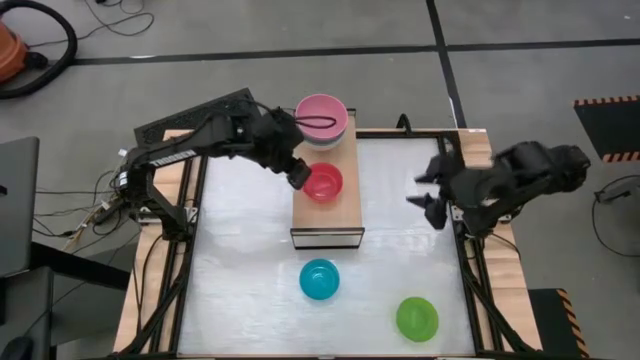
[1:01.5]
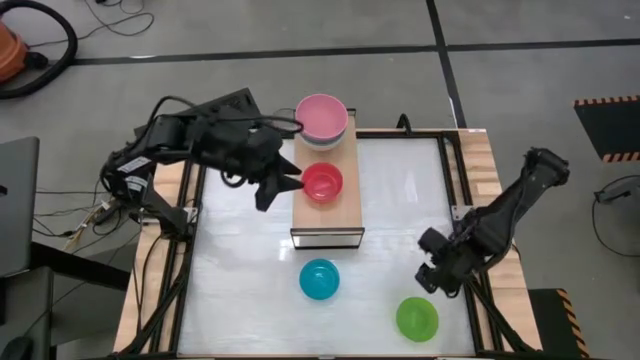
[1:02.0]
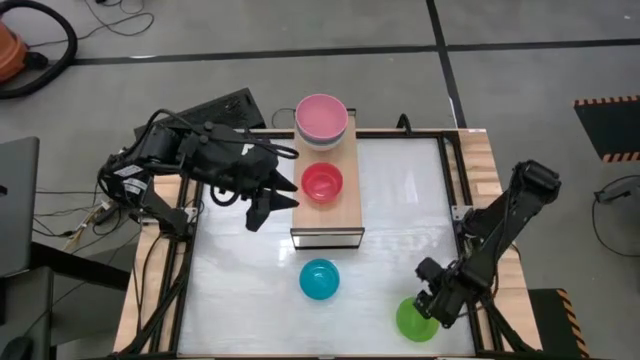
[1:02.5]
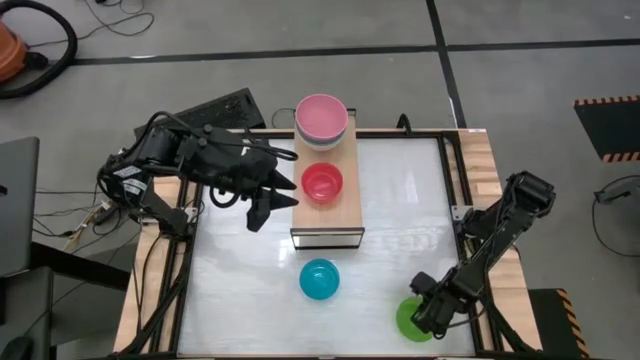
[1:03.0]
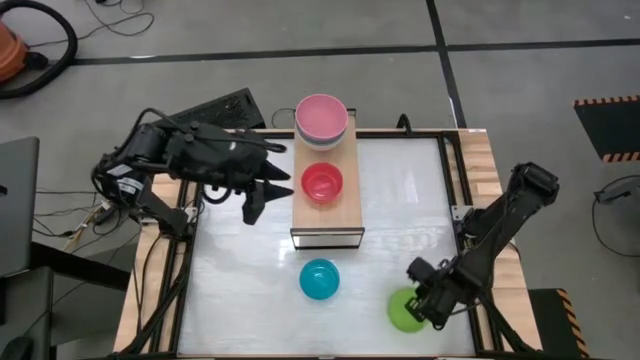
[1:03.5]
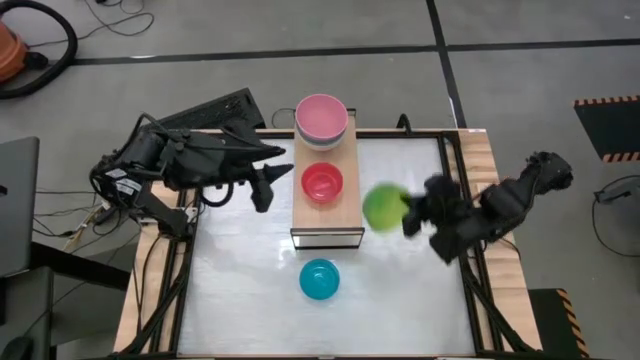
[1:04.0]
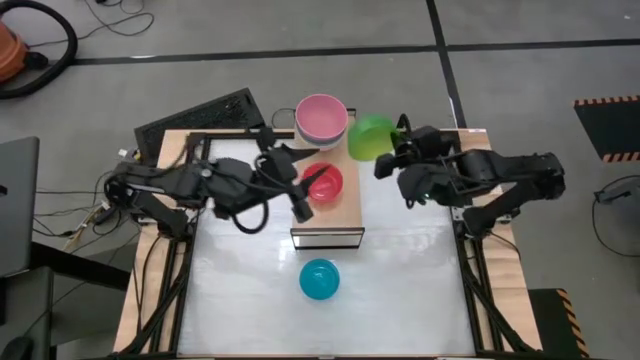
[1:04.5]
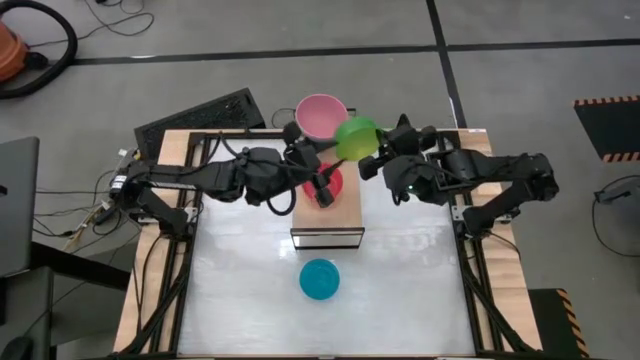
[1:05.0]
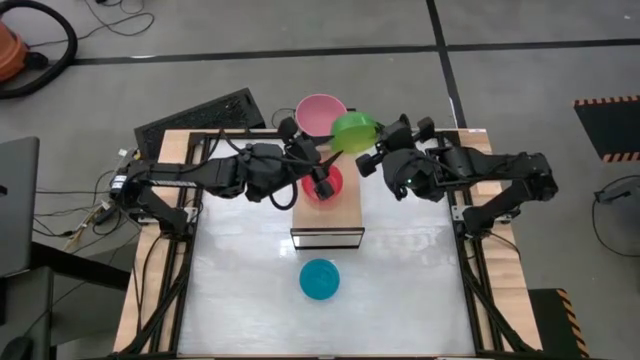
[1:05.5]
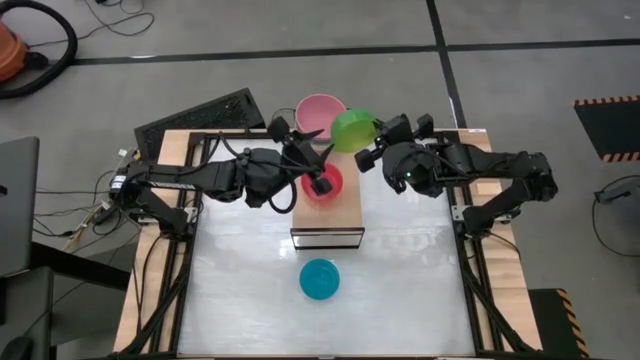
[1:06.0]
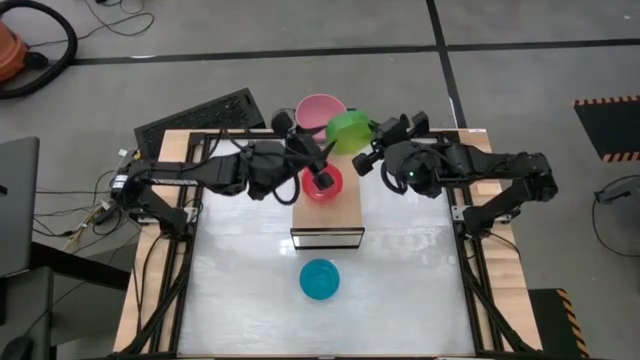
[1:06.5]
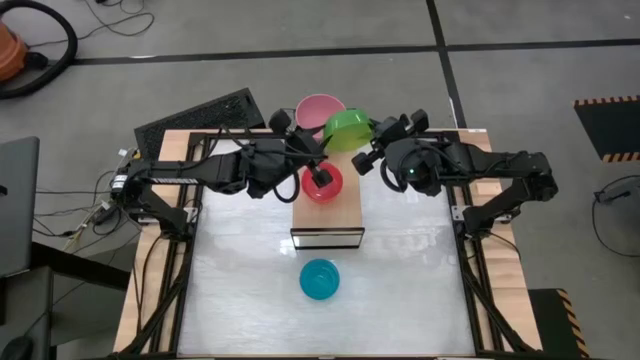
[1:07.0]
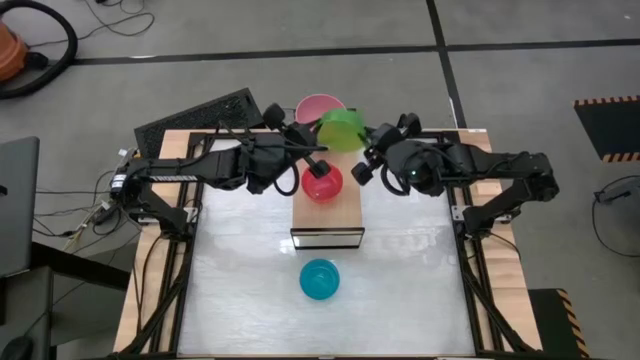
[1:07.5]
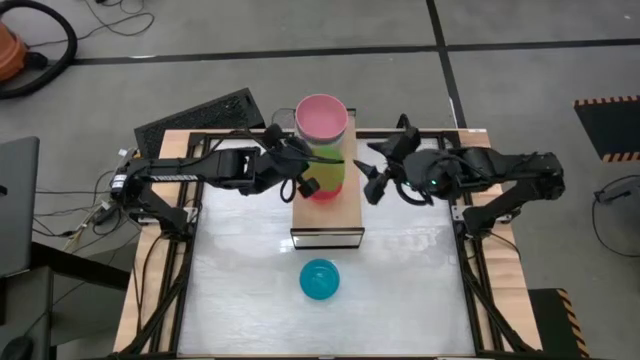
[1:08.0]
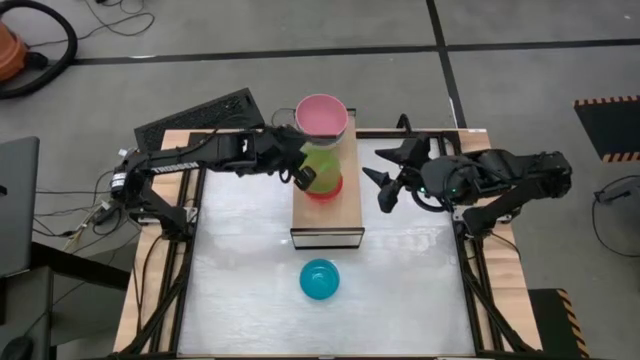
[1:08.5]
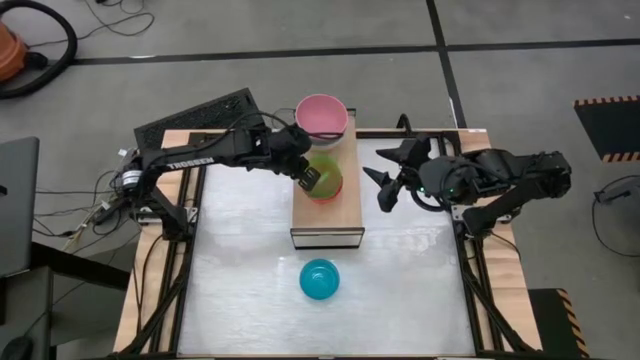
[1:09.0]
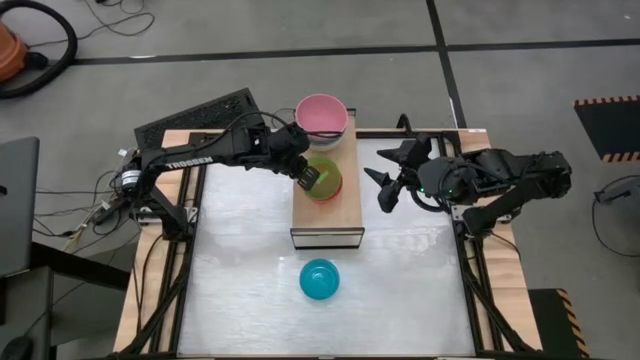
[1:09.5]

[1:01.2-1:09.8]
Task: Place and stack bowls onto a shelf
Stack the green bowl on top of the pink bowl on the shelf

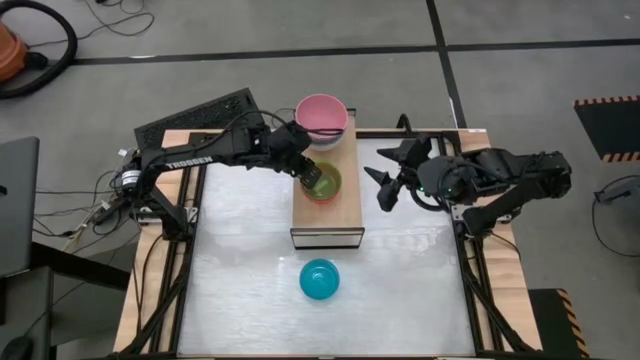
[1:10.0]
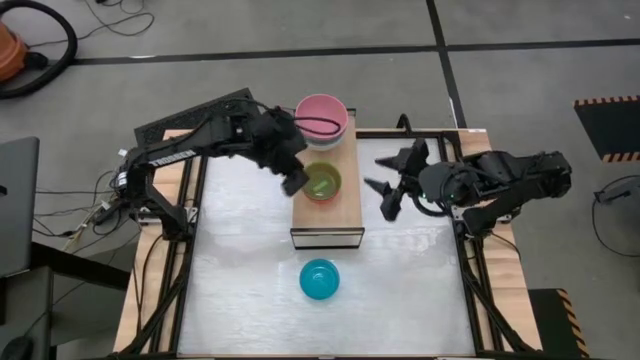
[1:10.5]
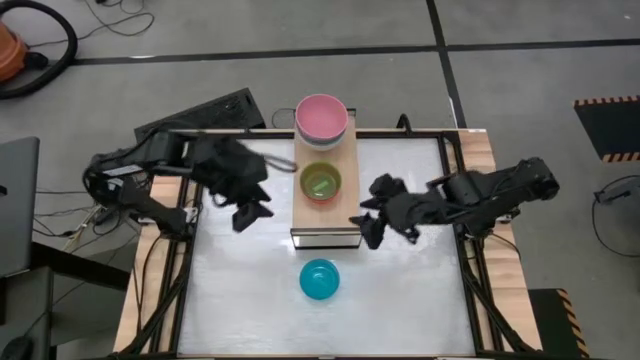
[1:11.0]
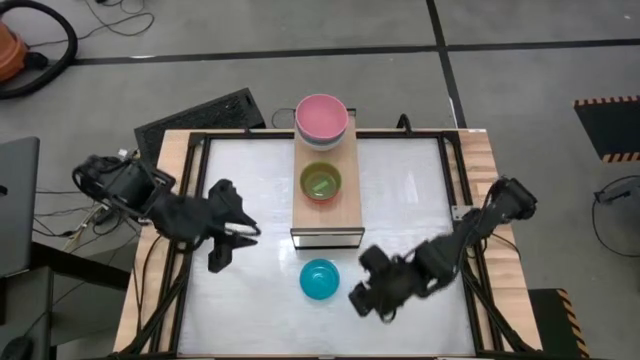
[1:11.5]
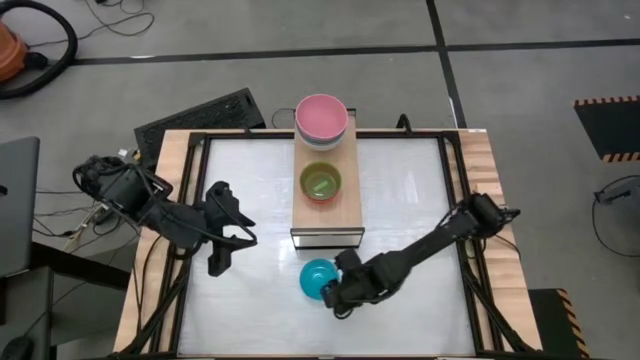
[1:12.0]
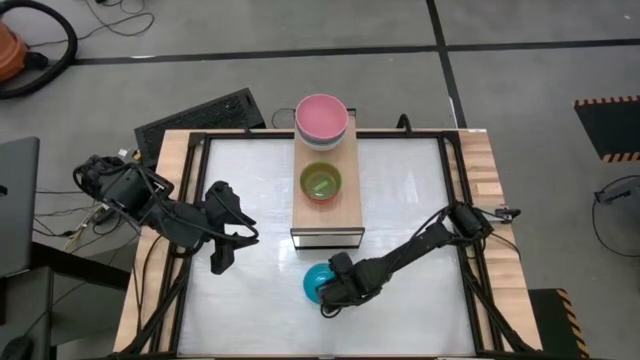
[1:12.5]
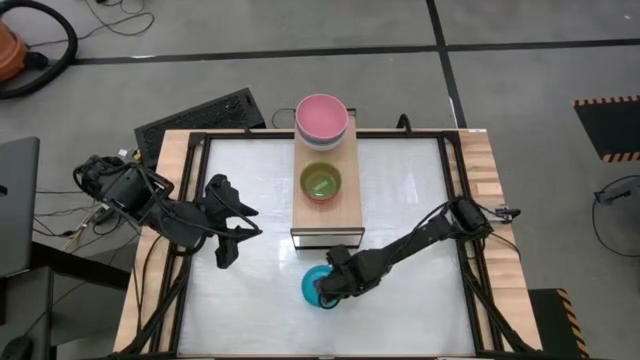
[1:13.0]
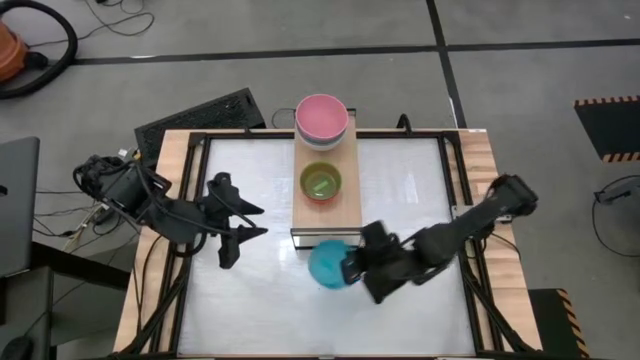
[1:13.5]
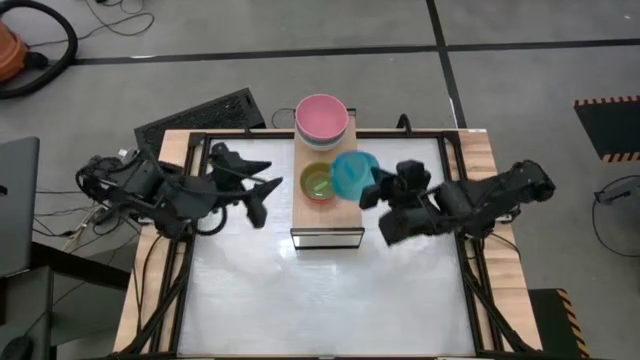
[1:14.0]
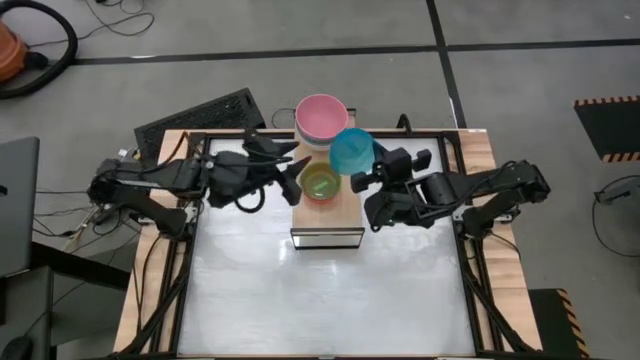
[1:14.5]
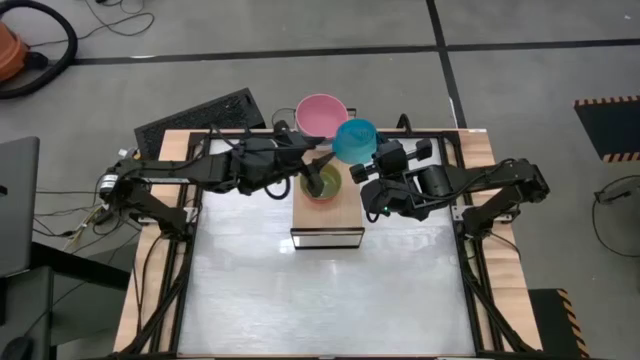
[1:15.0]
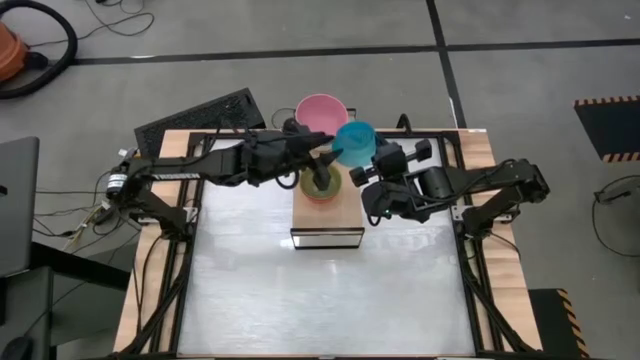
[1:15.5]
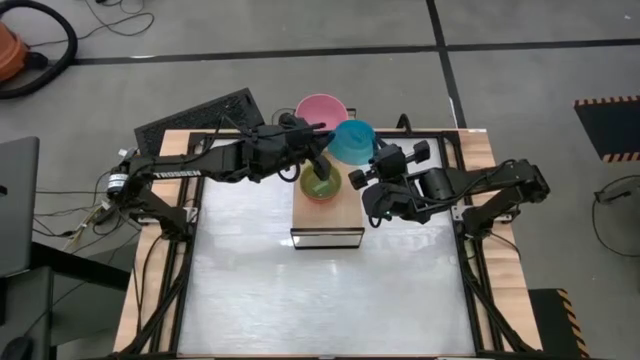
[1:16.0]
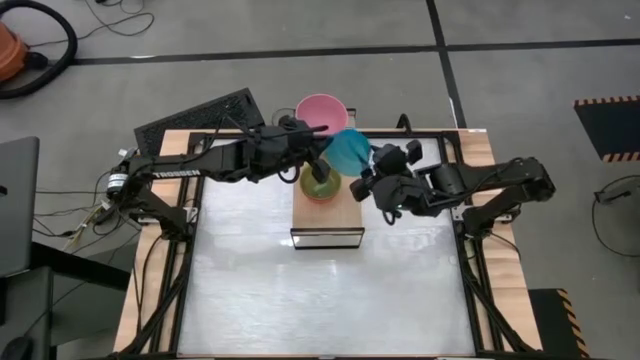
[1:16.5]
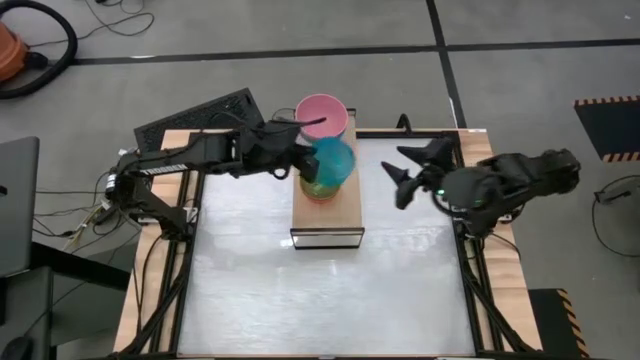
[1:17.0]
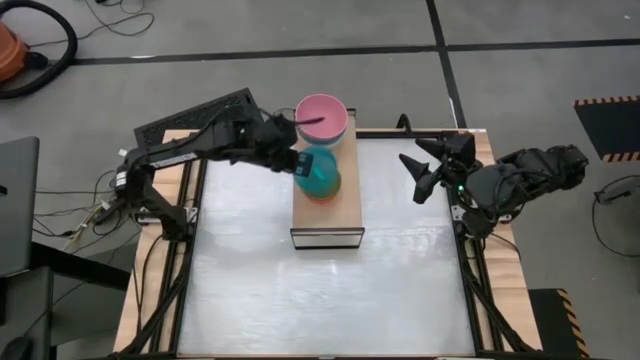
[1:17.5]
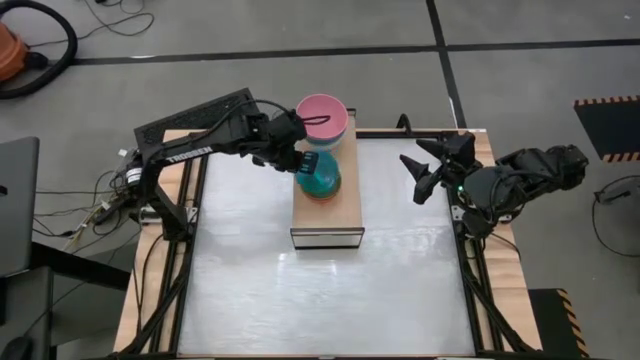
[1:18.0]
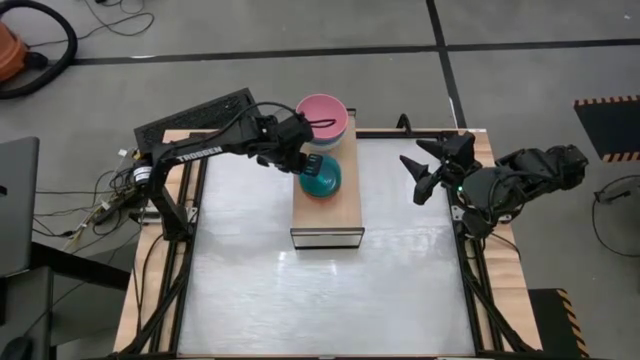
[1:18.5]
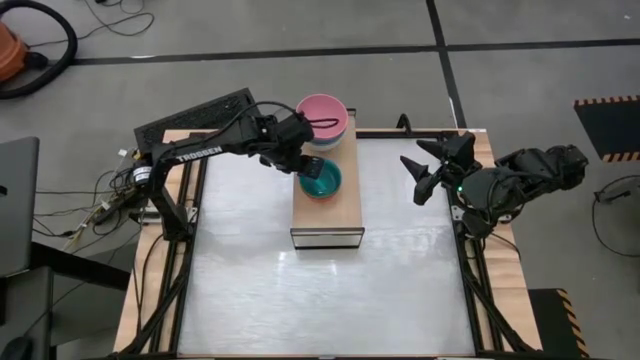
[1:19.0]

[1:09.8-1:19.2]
Stack the blue bowl on top of the green bowl on the shelf

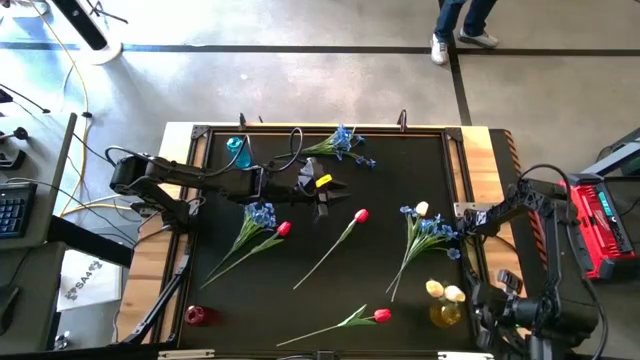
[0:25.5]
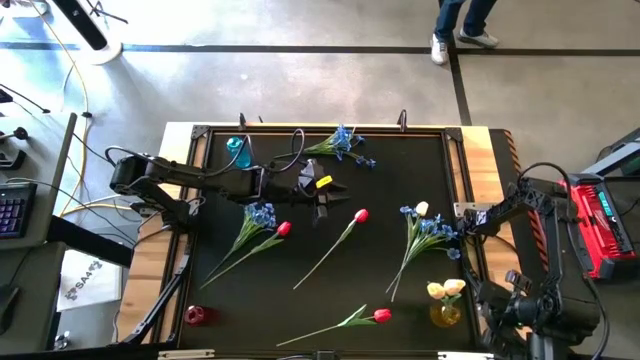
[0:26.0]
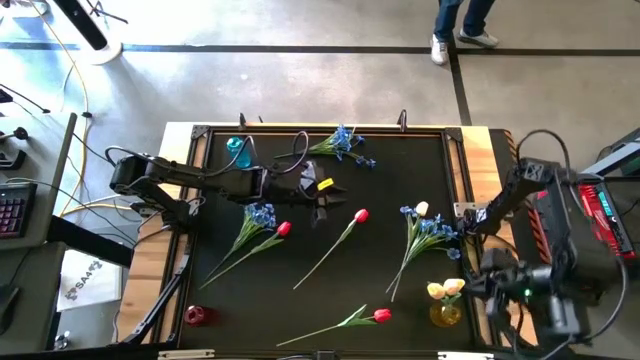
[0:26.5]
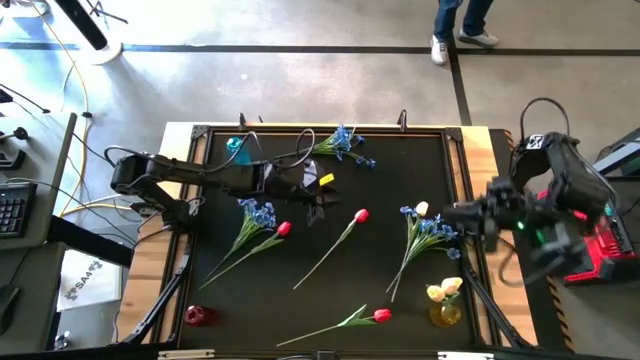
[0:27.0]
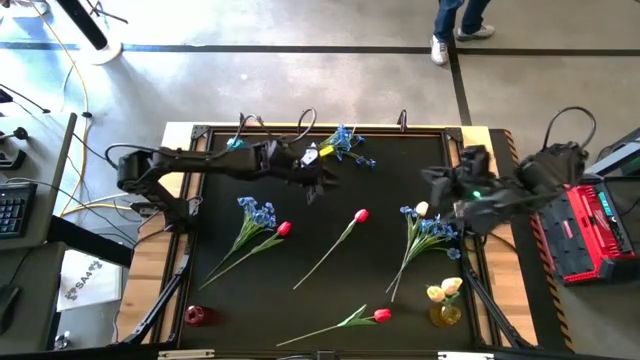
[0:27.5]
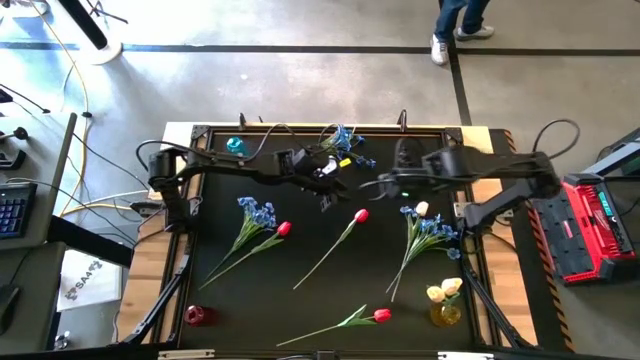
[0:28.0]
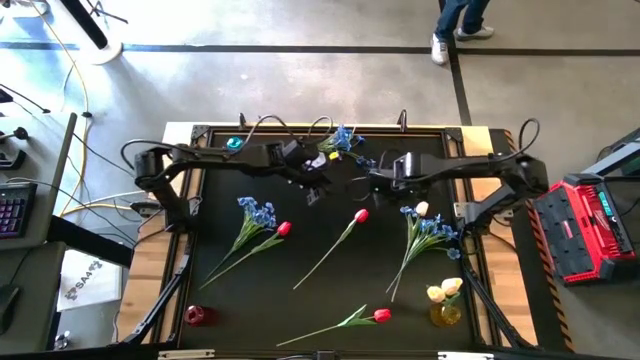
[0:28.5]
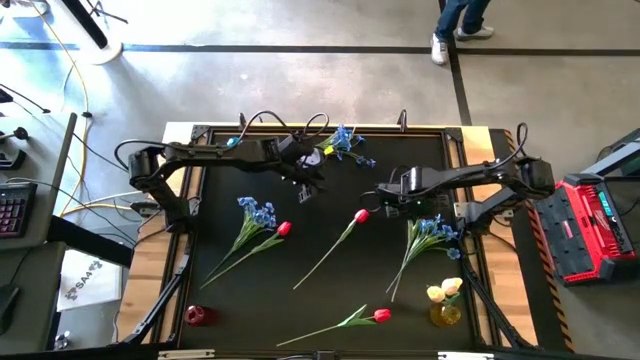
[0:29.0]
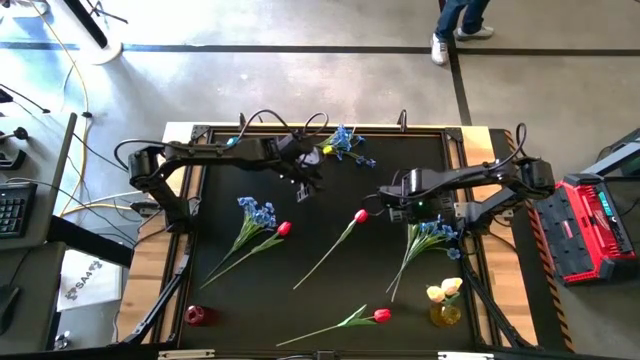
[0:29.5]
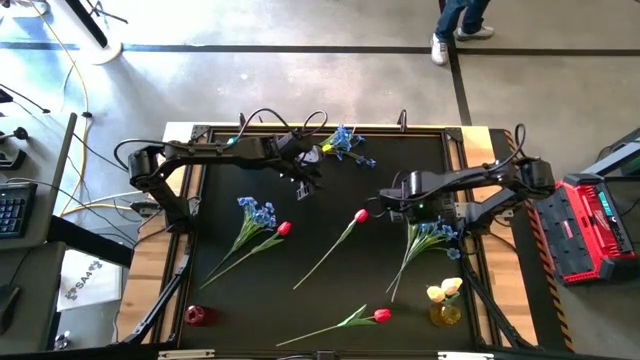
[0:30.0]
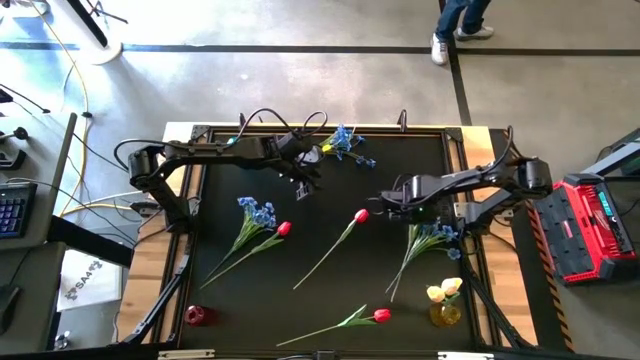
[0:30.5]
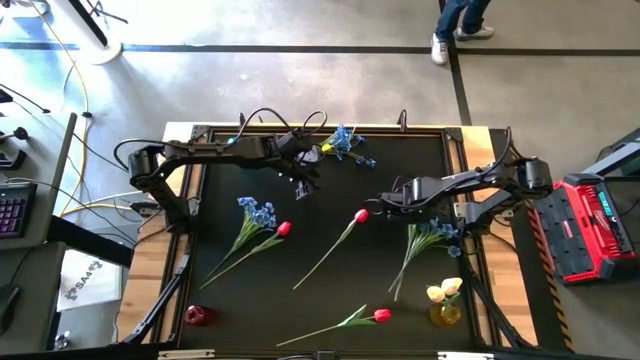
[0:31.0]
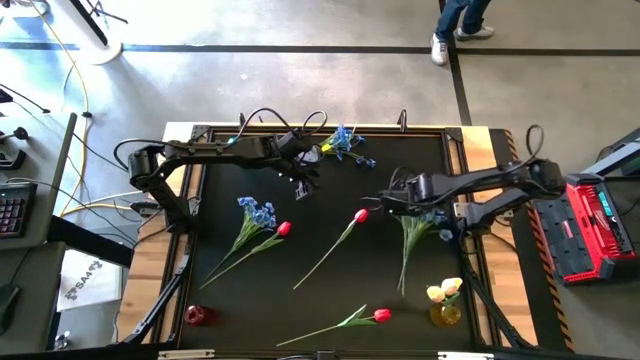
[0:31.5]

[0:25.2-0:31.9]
Task: Sort flowers into vase by color
Put the light yellow tulip into the yellow vase
